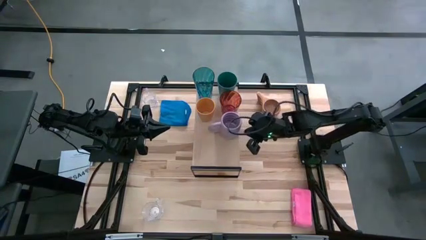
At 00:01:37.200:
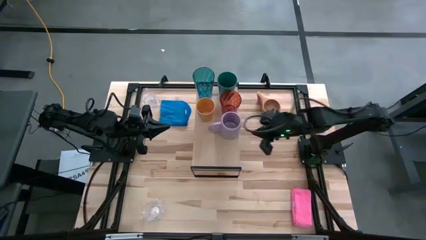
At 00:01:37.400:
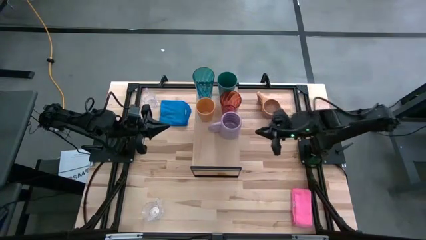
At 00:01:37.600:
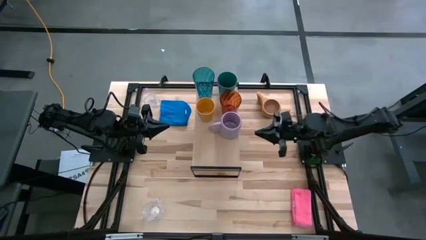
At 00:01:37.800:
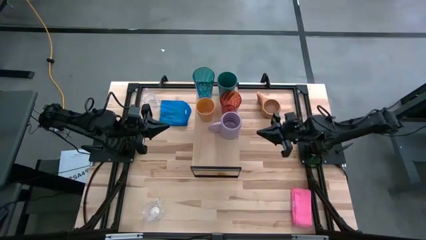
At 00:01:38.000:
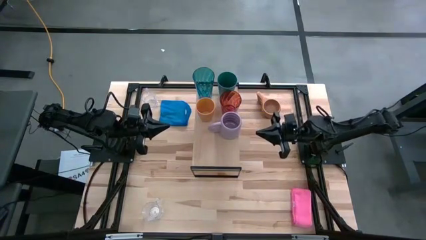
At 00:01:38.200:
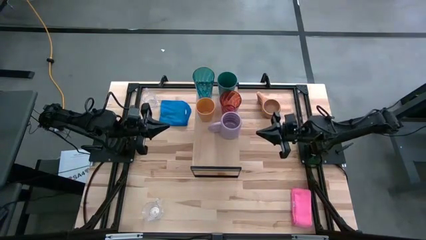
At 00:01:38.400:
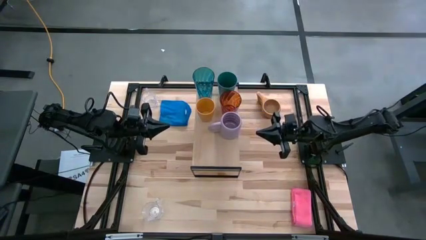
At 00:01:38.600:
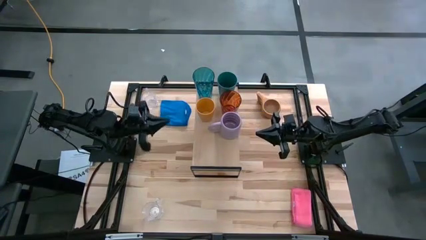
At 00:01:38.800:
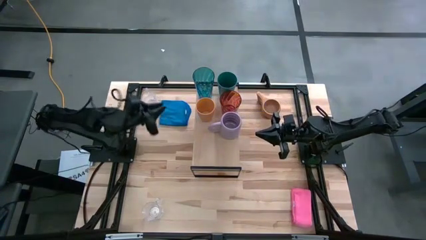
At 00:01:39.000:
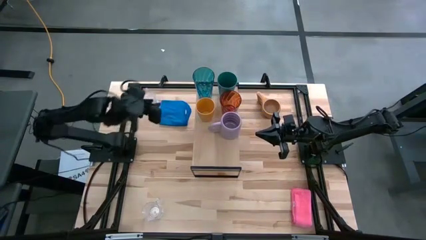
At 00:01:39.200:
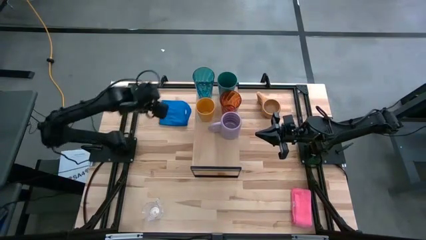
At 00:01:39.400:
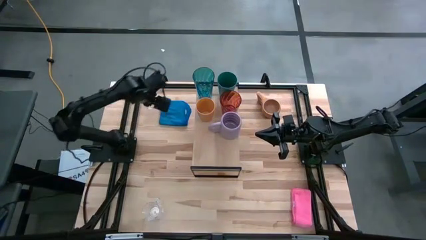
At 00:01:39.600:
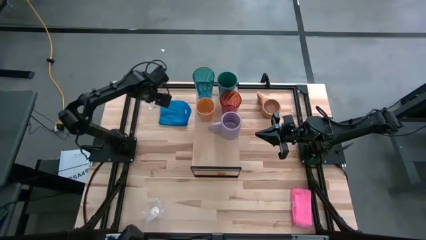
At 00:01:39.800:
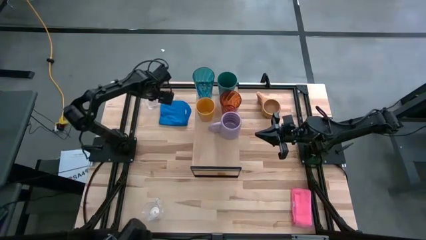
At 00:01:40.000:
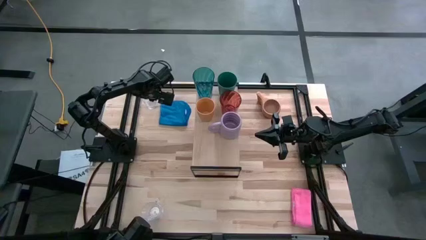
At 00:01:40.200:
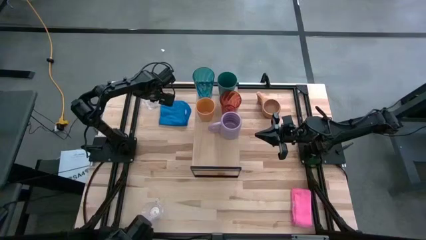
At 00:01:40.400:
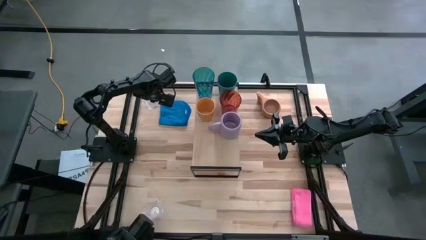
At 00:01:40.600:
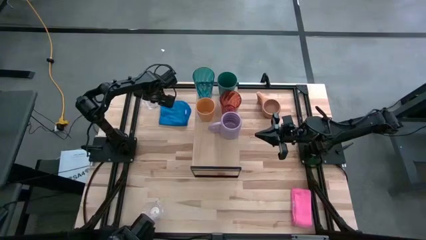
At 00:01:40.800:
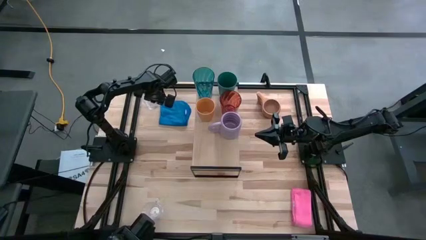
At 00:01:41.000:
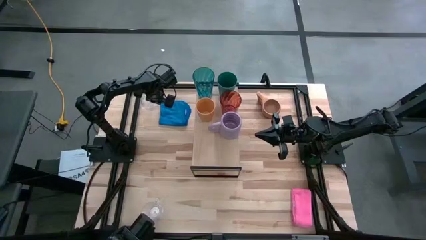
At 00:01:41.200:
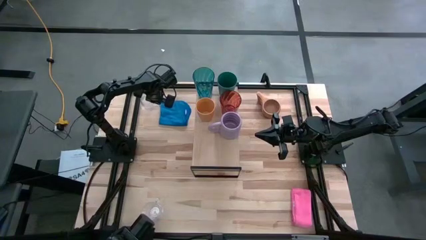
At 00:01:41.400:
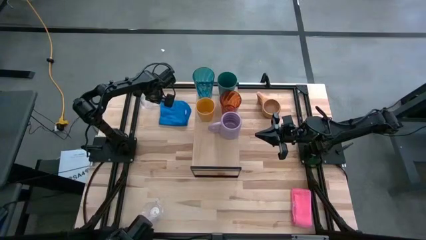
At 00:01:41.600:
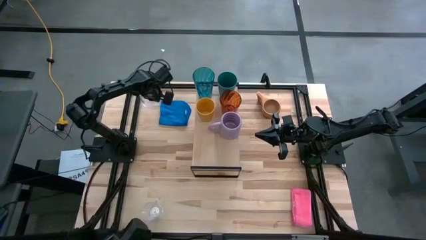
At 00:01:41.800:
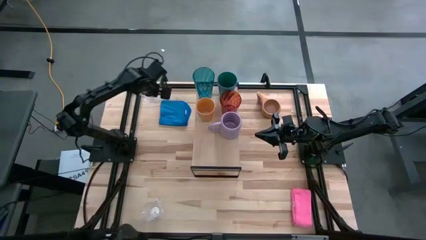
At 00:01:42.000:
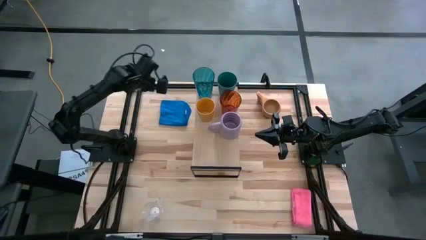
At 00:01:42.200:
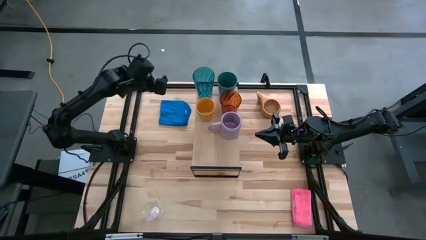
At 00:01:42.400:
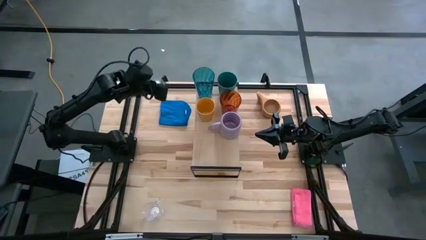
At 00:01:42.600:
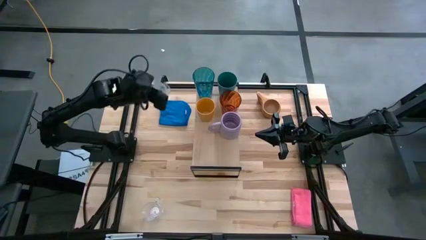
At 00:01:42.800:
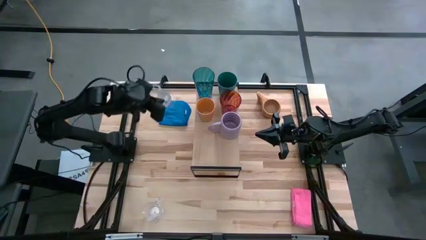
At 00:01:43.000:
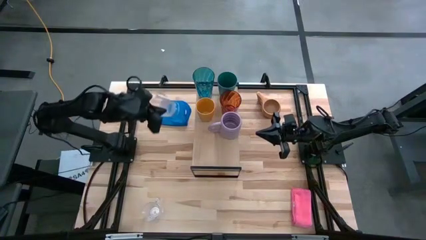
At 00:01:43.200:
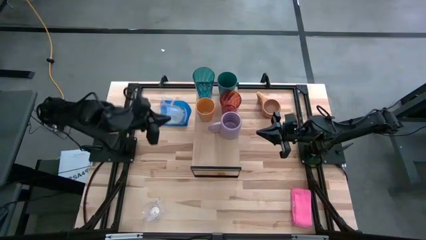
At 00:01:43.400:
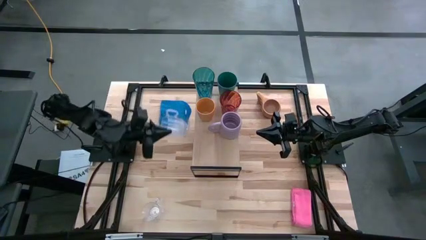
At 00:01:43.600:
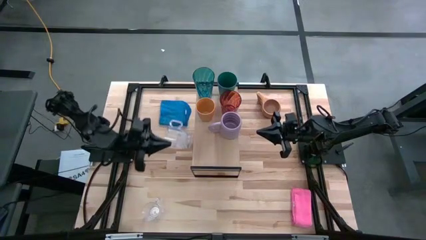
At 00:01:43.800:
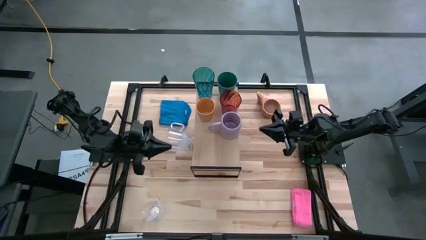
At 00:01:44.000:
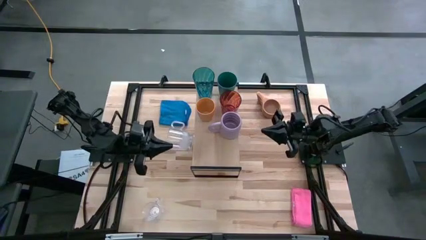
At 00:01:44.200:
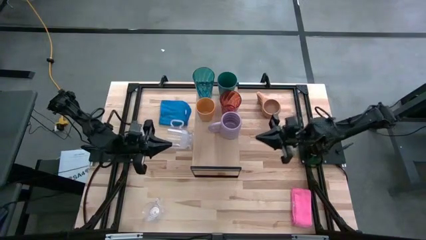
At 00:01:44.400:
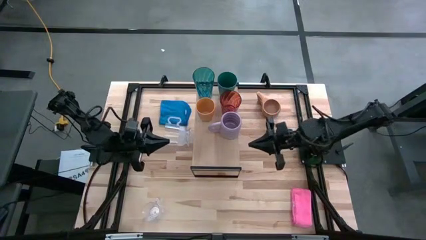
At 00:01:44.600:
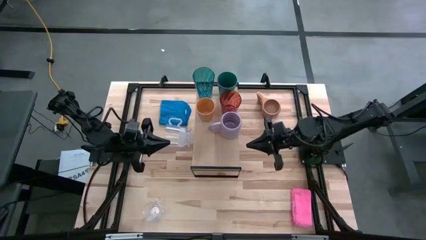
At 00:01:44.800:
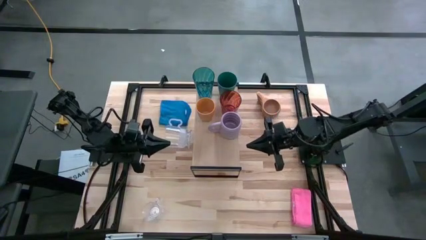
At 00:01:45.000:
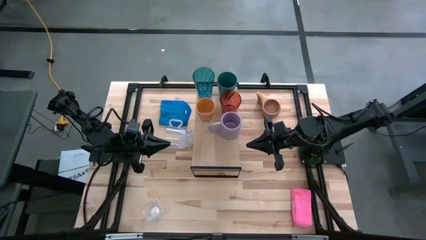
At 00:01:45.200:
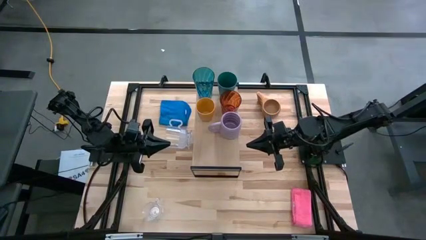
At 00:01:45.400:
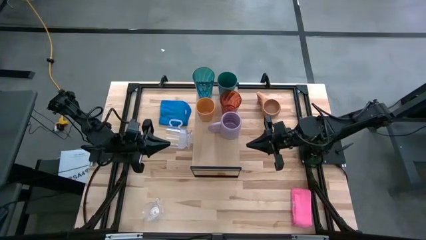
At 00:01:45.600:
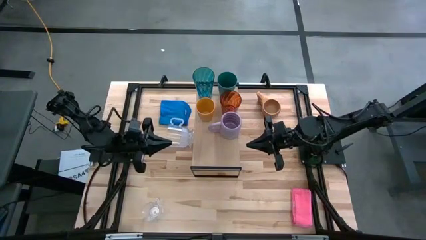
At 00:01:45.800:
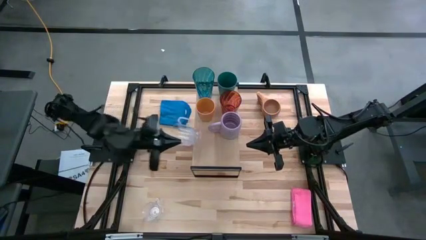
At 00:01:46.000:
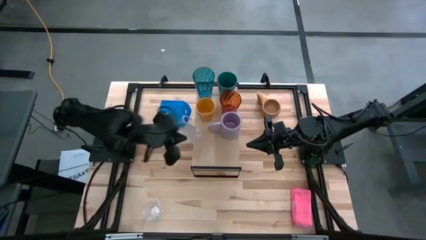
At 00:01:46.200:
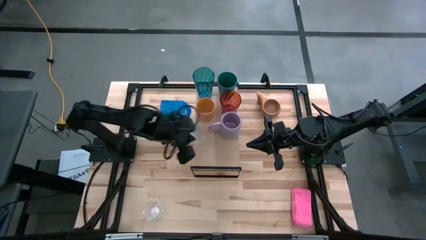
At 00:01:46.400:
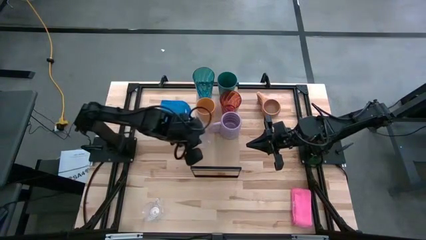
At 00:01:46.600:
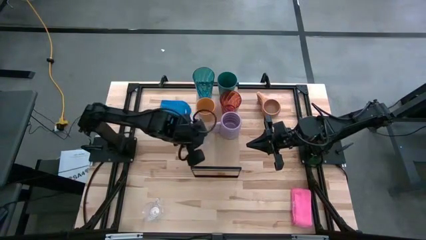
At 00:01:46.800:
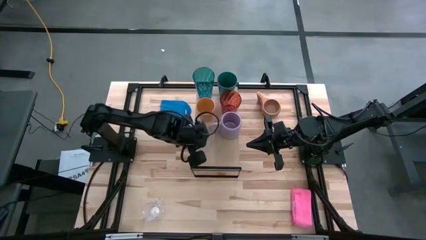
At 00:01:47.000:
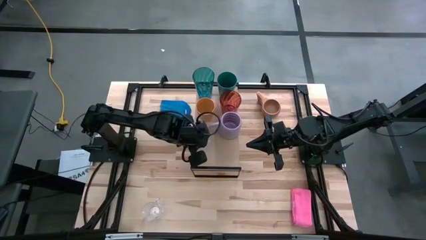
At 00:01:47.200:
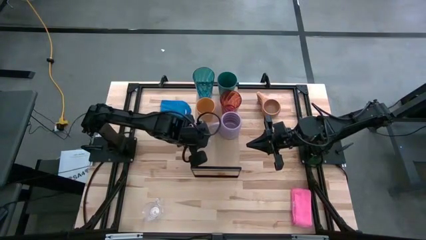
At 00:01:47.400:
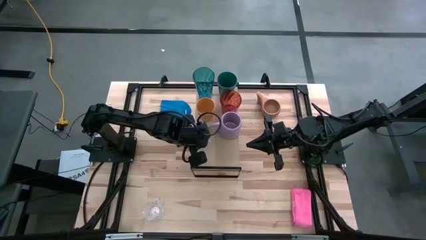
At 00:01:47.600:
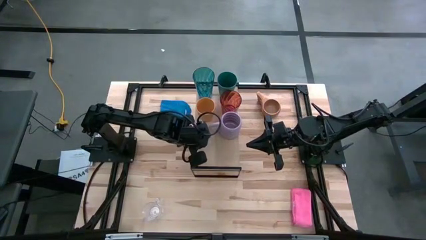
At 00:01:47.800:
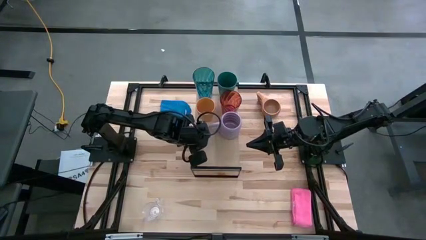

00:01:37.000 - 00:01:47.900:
Task: Stack small to large cups/mugs on shelf
Put the top transparent mug on the shelf

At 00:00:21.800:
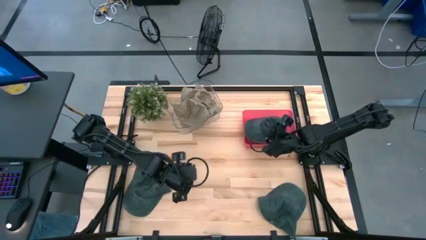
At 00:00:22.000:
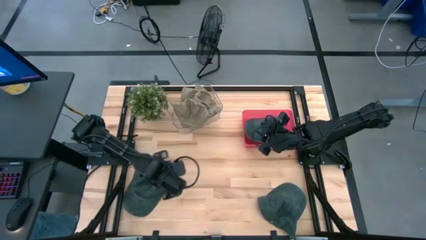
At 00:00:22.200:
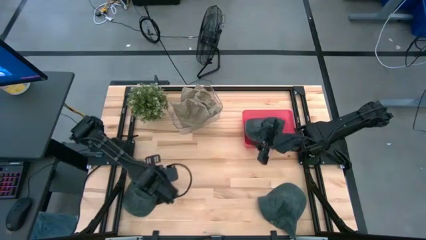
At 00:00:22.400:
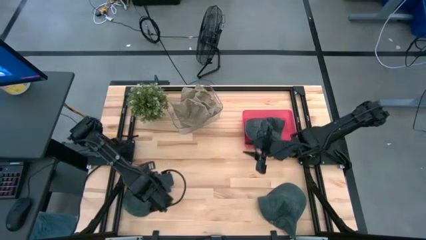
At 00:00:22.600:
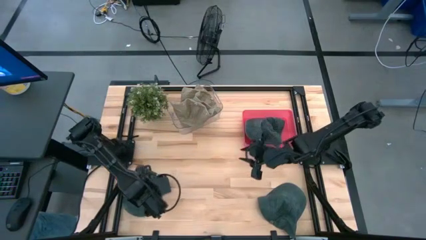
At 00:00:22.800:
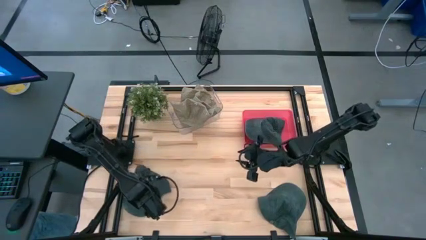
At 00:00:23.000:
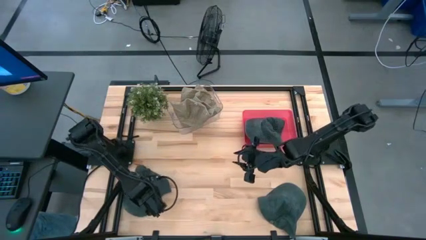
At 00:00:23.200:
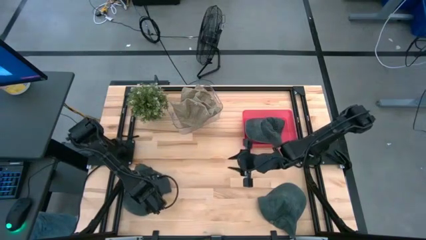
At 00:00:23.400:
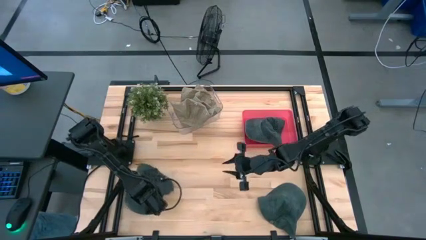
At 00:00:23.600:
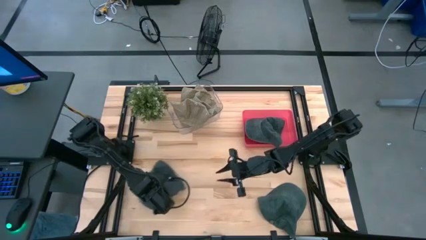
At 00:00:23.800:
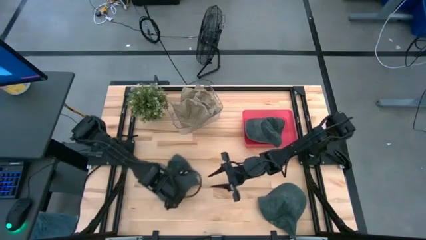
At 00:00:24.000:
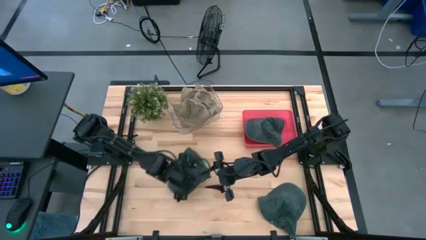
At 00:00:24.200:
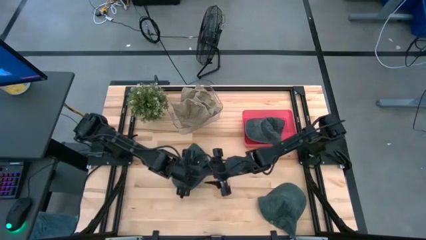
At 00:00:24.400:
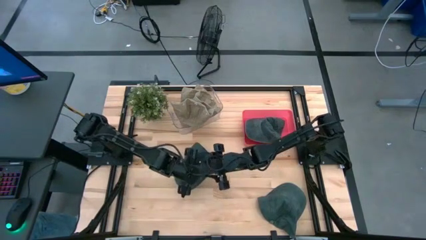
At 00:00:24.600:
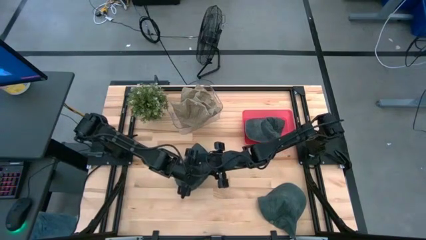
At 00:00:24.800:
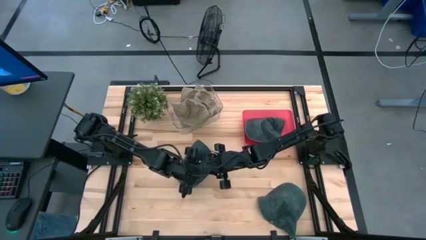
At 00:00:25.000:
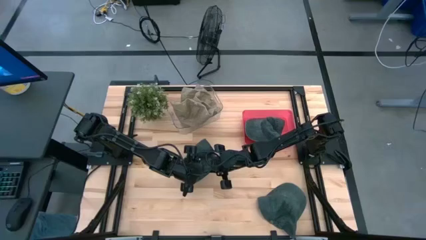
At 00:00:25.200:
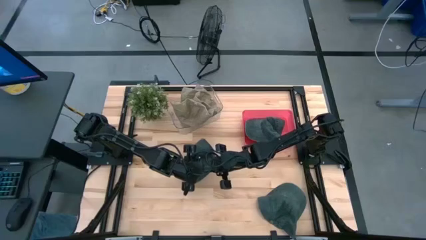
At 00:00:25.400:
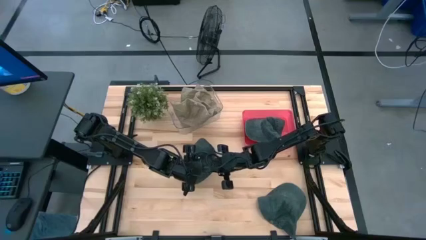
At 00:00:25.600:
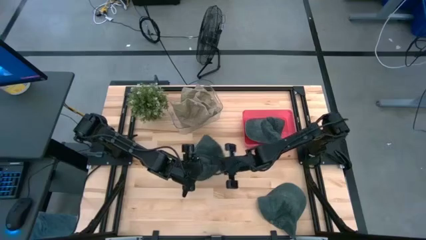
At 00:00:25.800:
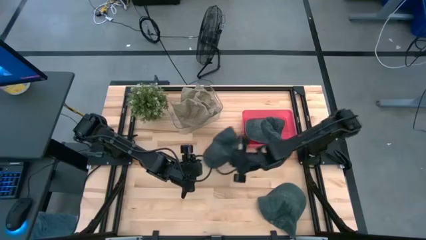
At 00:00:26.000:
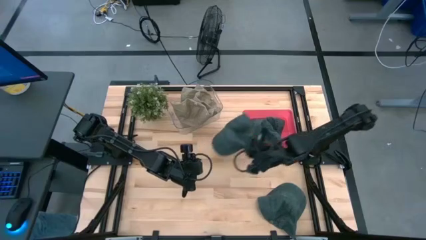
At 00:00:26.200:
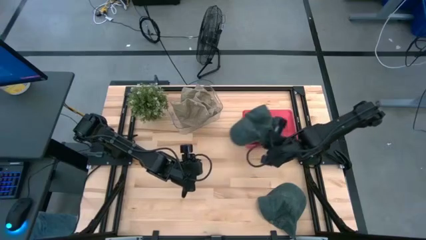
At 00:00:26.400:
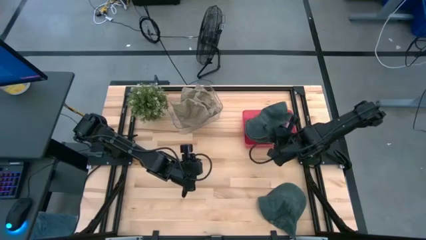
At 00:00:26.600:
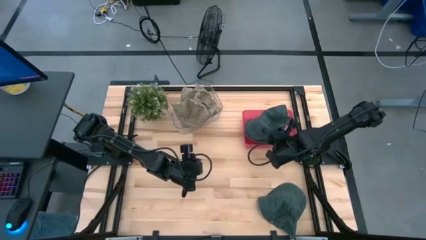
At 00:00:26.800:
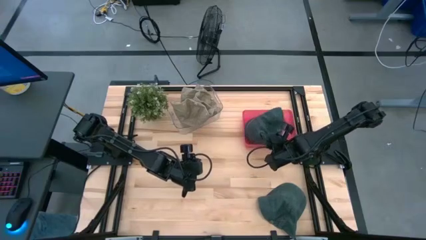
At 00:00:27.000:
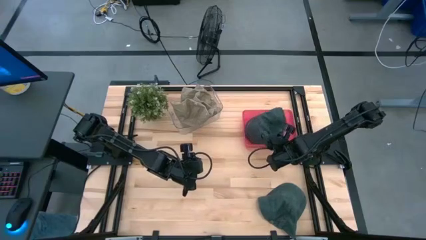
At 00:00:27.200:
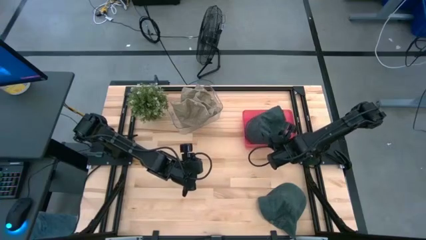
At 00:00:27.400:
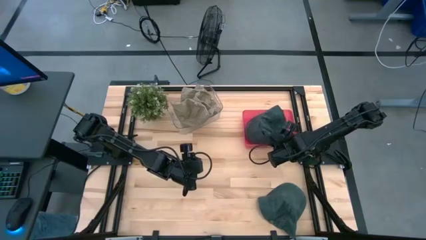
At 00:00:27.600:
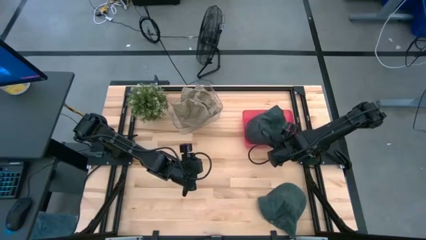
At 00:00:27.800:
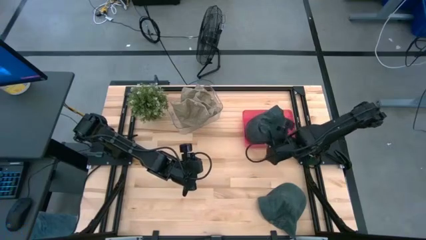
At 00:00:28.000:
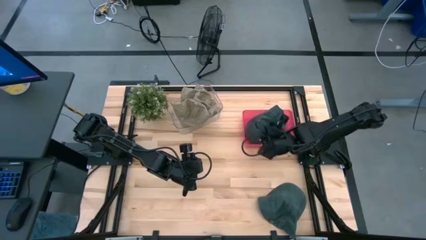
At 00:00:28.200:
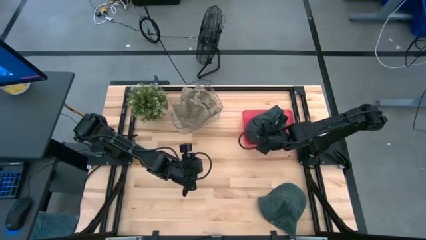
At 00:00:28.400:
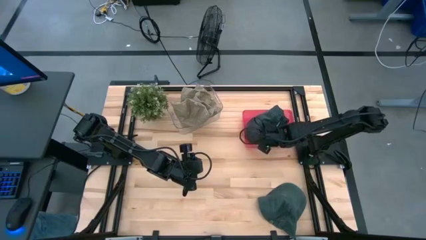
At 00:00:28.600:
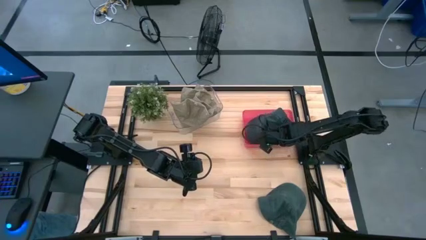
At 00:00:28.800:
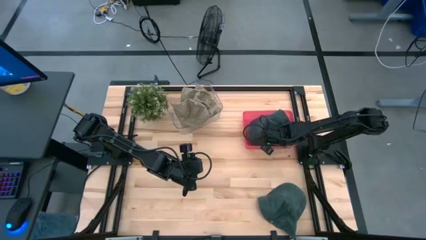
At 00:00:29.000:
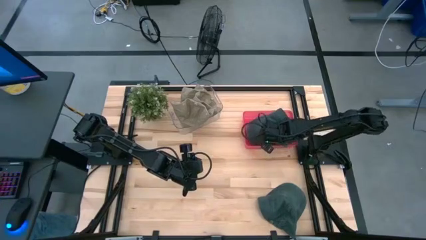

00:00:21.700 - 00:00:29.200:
Task: Pick & Place hat
Put the left black cap into the red bin
